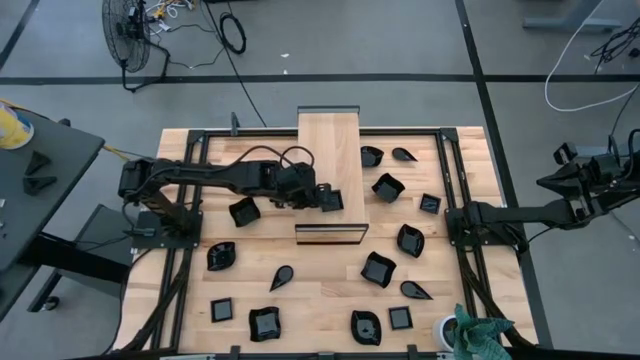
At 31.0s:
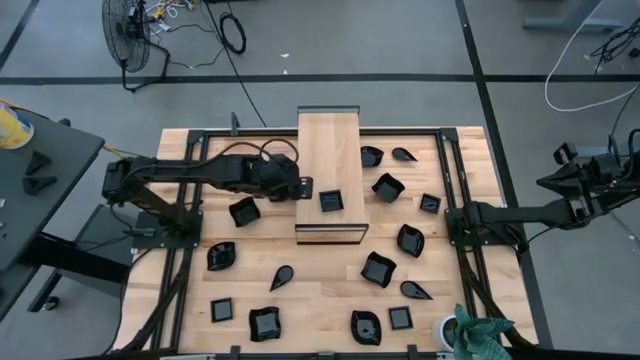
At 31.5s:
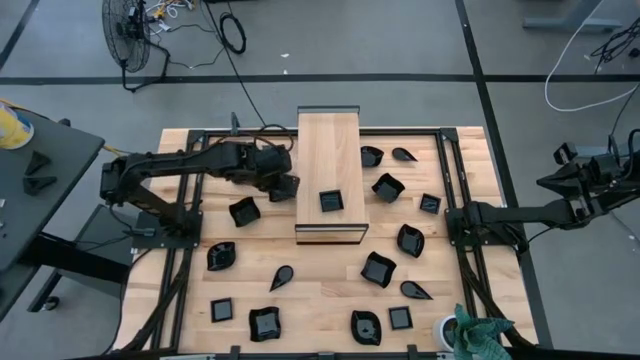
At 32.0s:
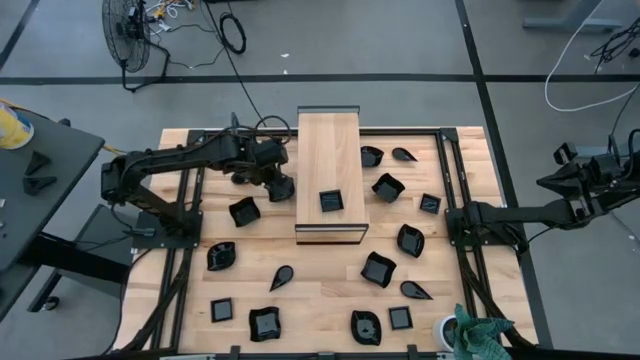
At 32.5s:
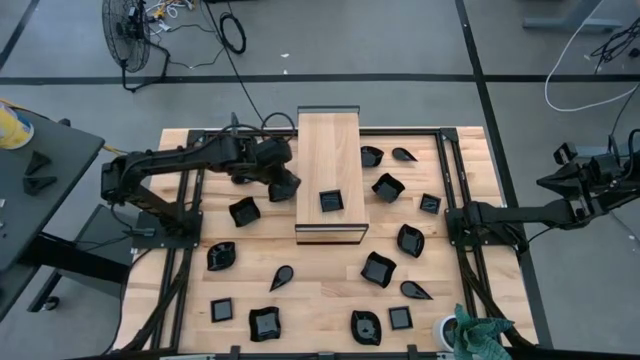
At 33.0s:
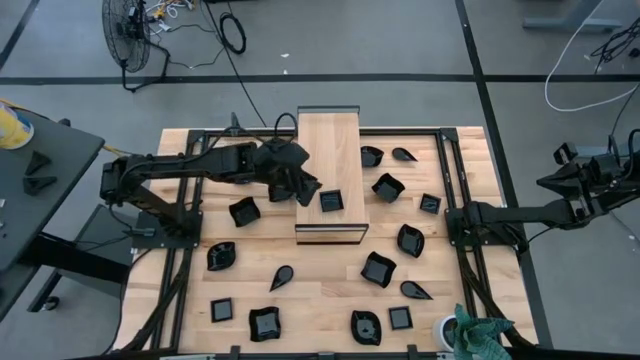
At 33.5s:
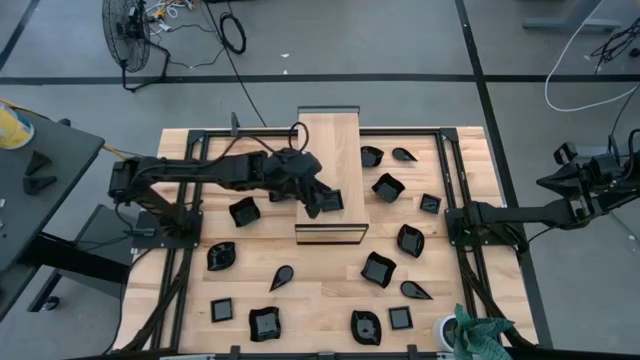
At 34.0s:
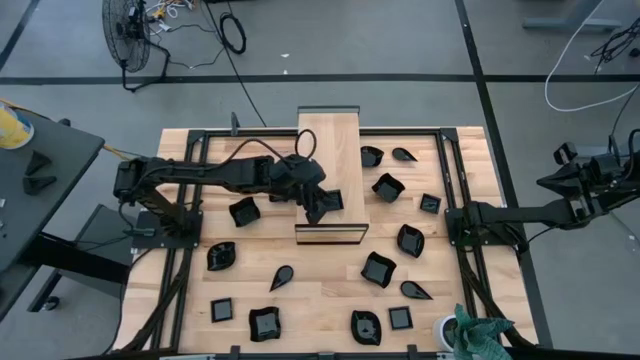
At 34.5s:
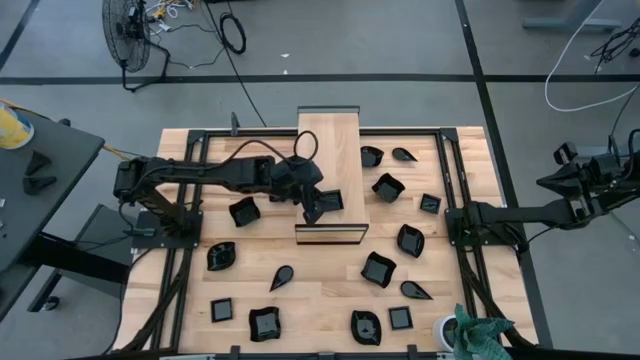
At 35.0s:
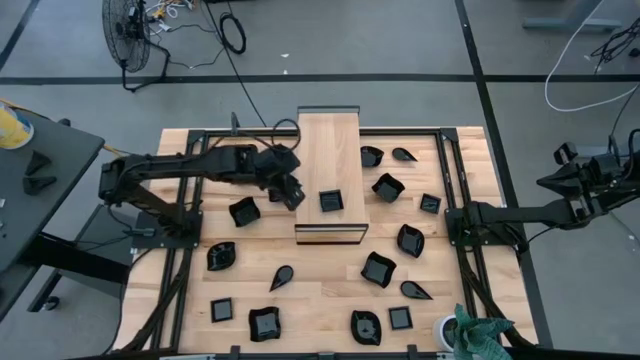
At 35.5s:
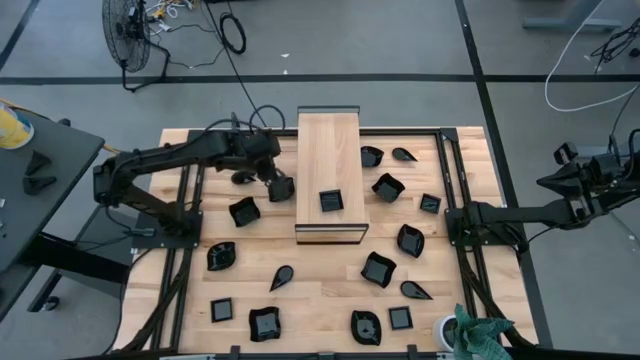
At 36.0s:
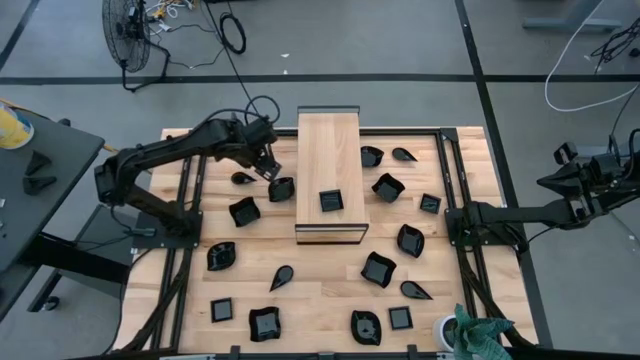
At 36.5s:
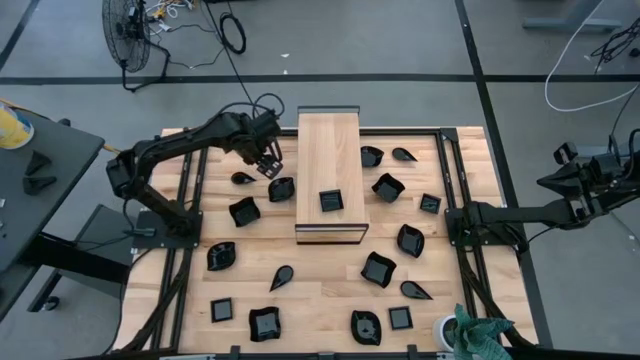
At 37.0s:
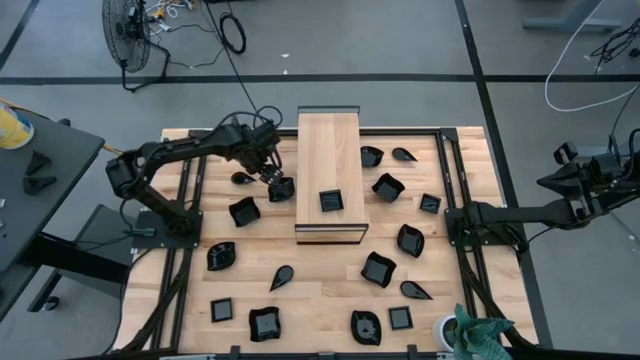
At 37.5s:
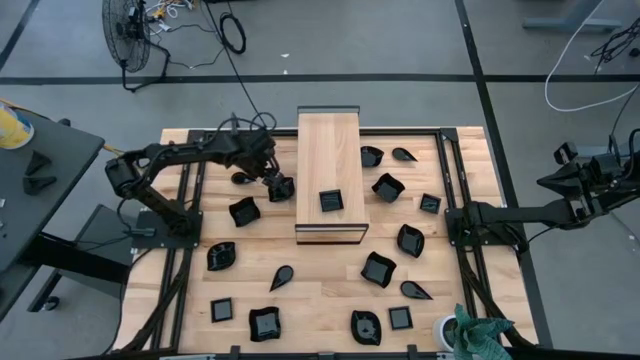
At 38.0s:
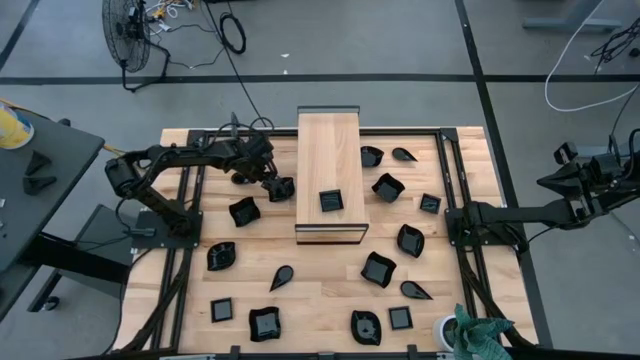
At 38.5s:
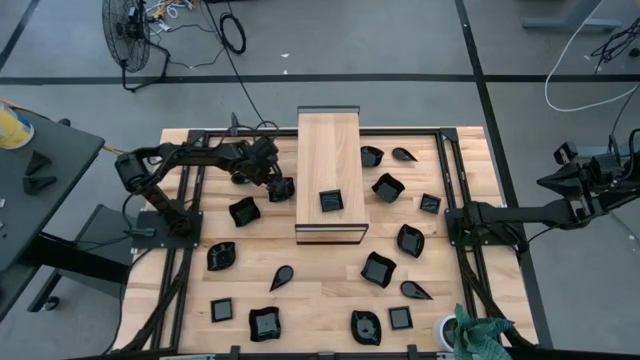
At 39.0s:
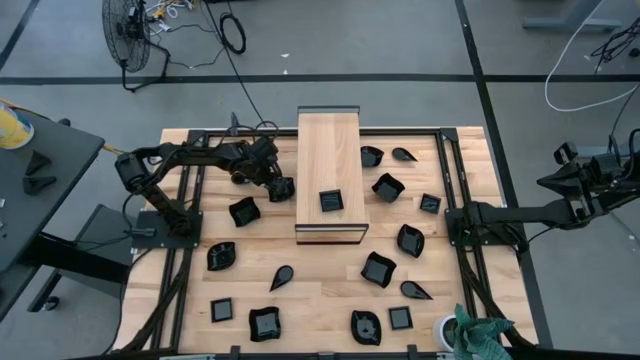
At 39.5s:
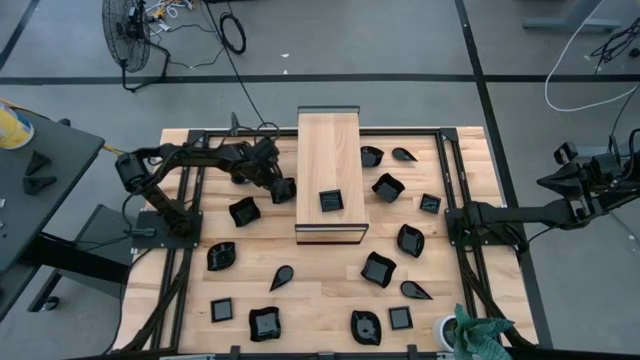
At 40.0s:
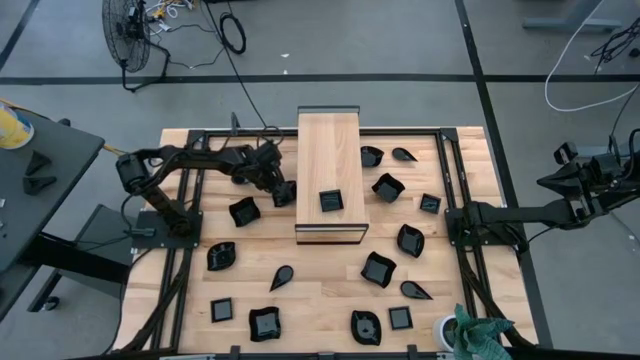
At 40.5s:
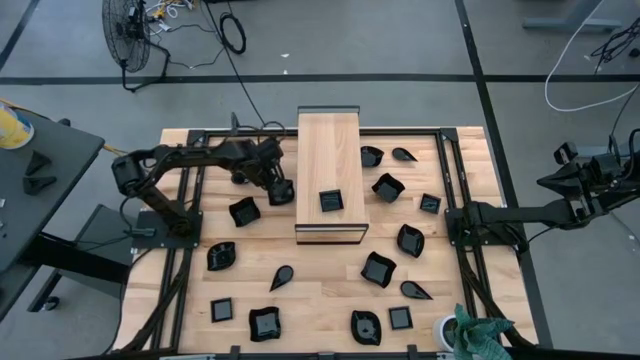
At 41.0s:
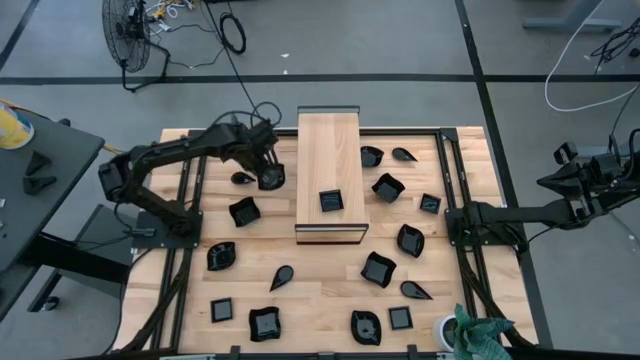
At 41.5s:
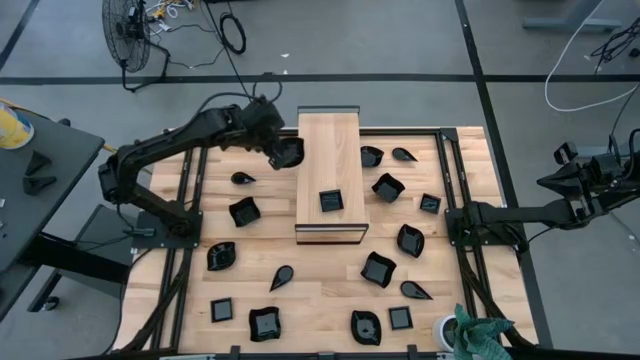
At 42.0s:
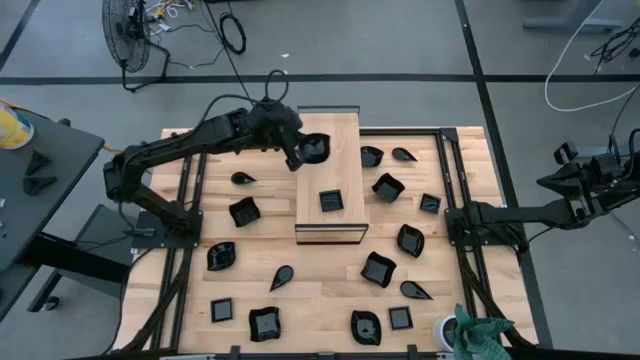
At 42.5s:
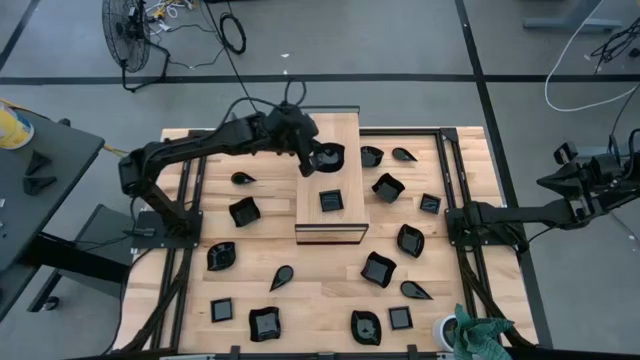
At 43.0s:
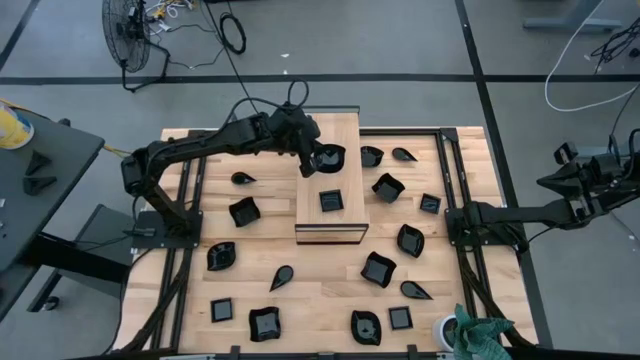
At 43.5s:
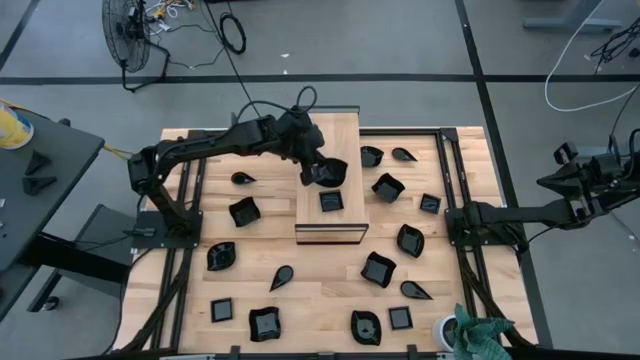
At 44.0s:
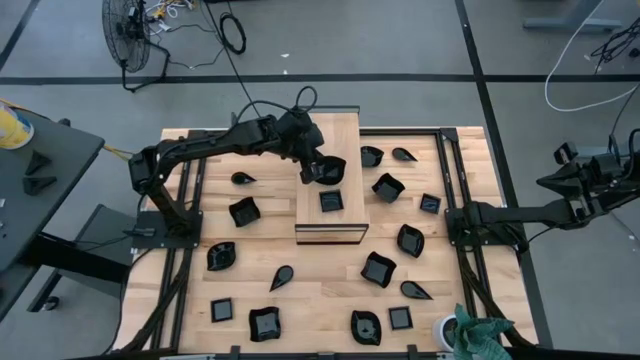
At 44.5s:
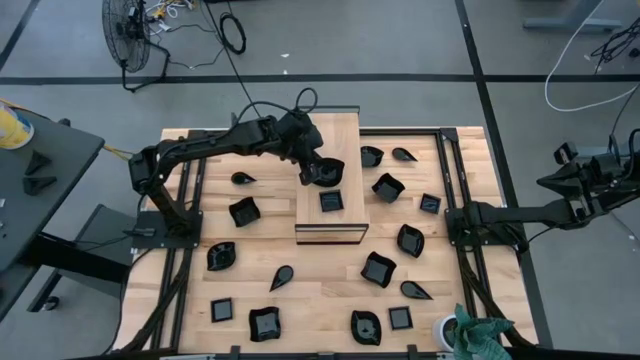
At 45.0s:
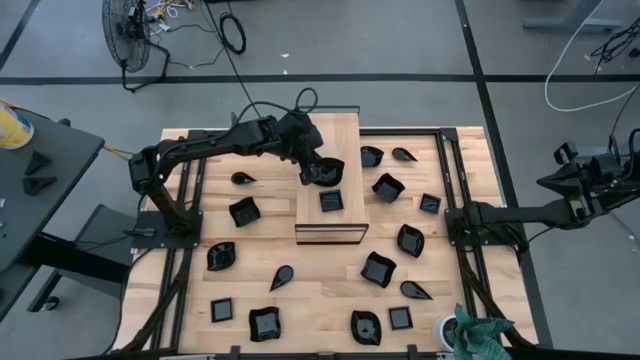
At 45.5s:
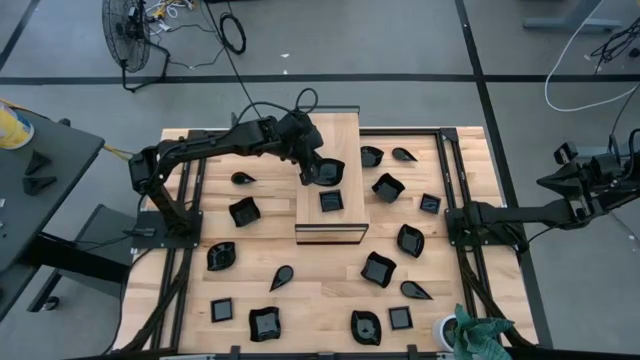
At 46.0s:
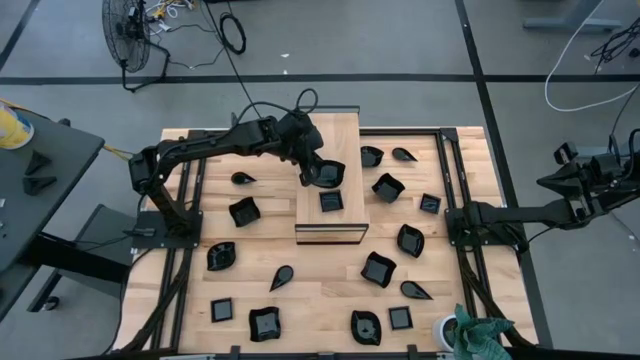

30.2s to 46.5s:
Task: Pick & Place Mini shaped plates
Put the leaf-shaped plate on the shelf

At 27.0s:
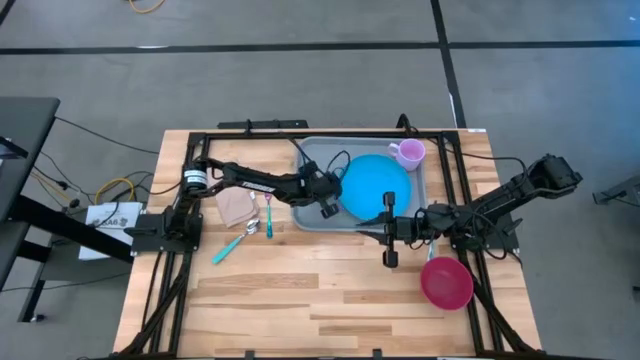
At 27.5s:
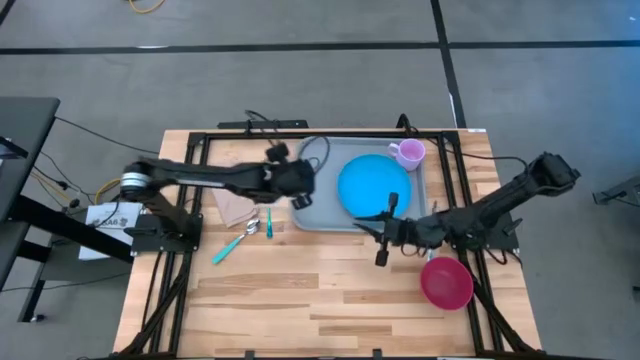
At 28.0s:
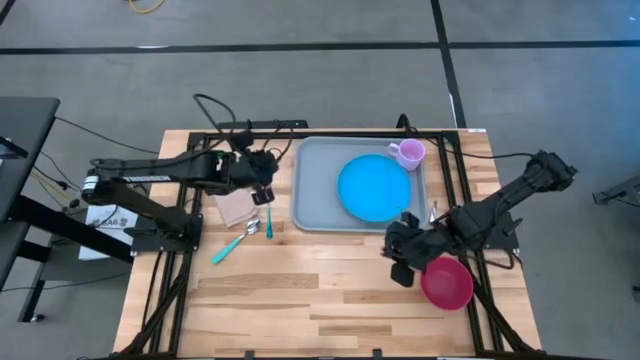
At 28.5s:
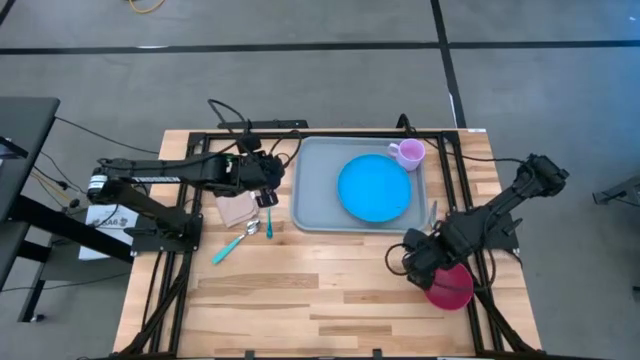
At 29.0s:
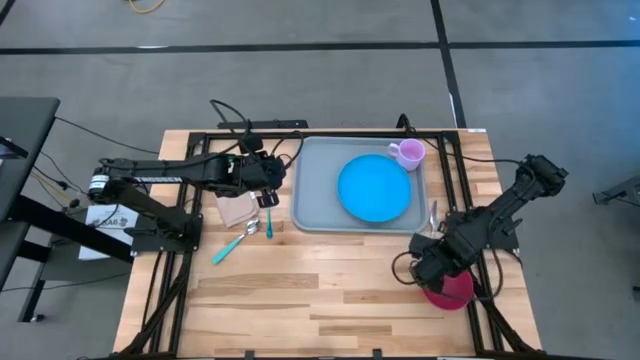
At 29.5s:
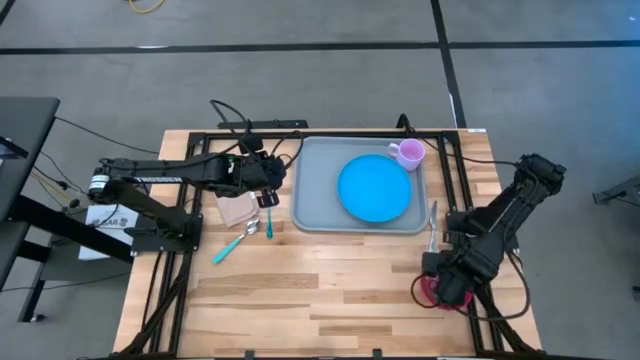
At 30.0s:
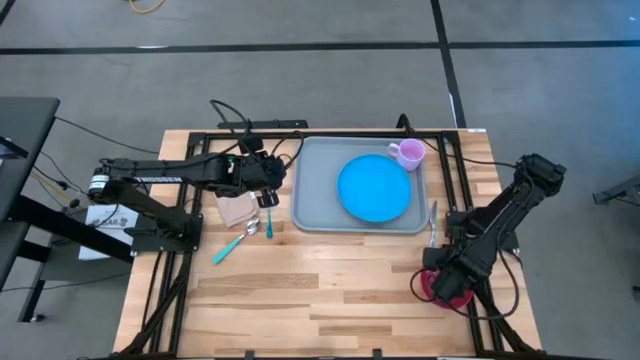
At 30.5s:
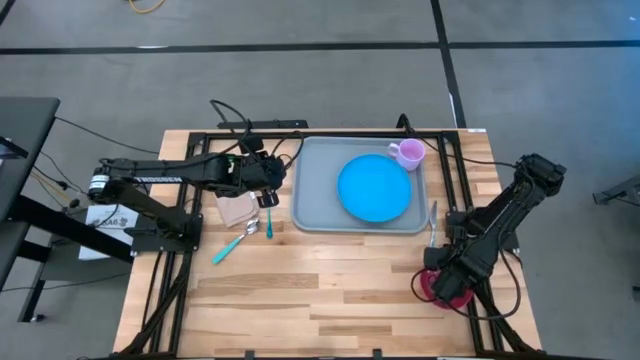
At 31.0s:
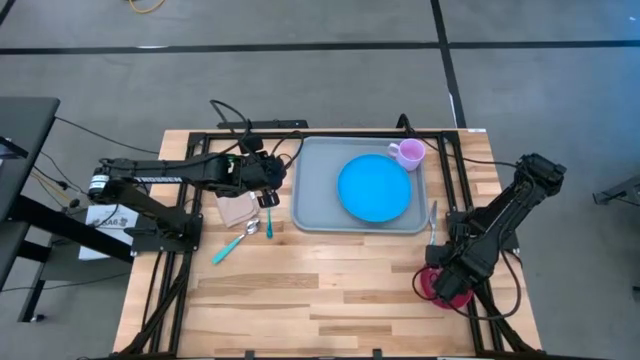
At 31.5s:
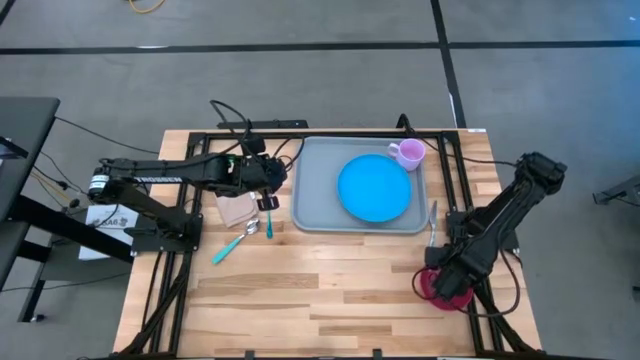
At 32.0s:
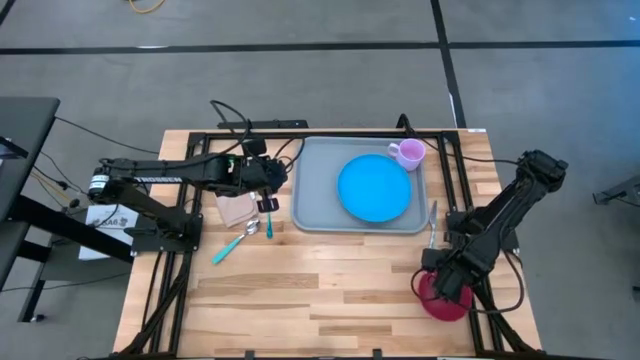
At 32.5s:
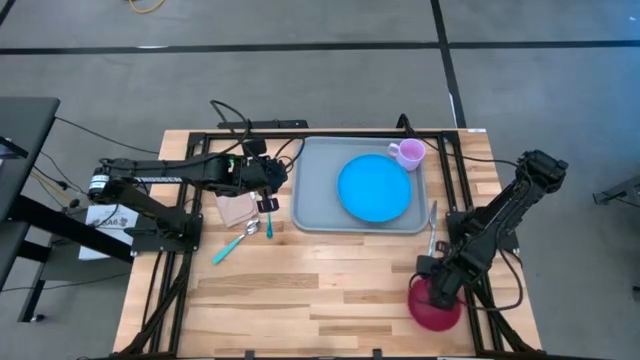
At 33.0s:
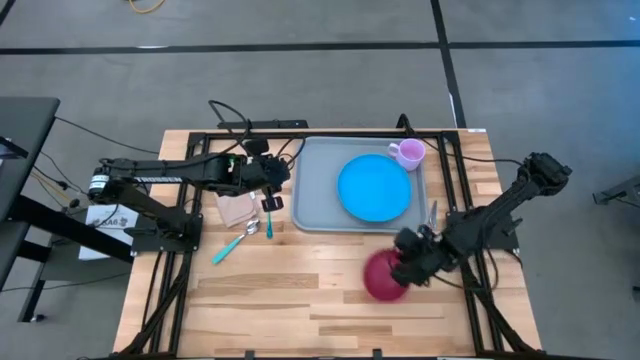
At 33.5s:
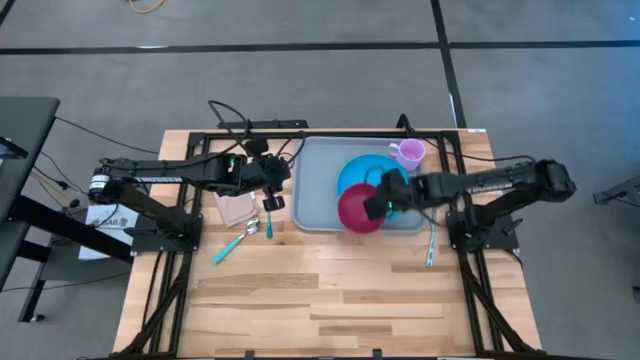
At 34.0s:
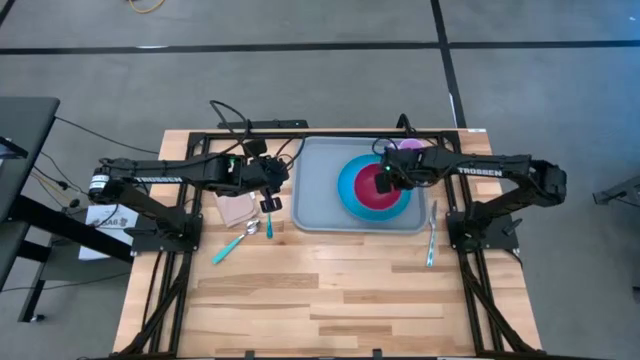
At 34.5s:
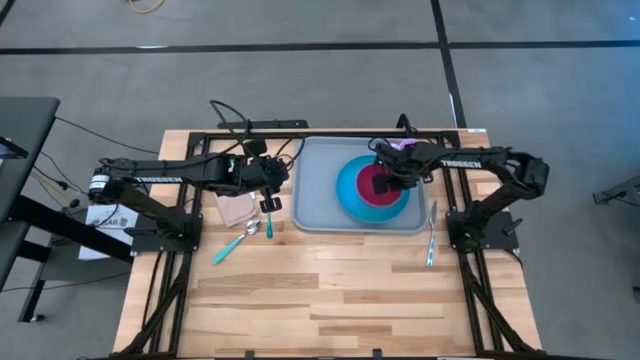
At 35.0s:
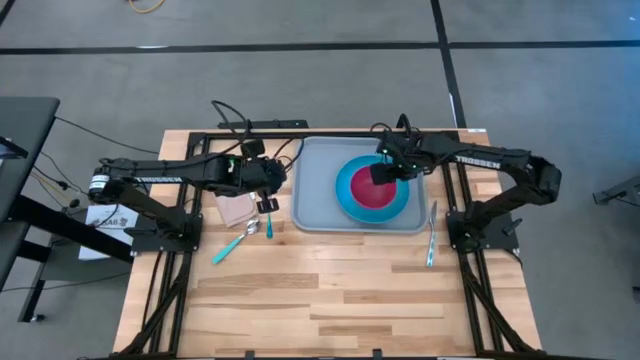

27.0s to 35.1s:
Task: Set up tray
Put the pink bowl on the blue plate
